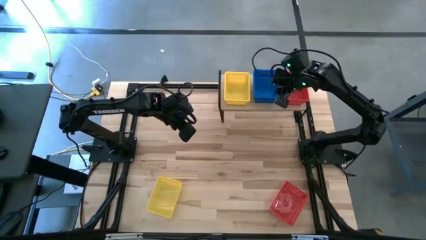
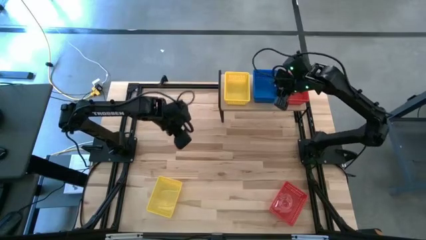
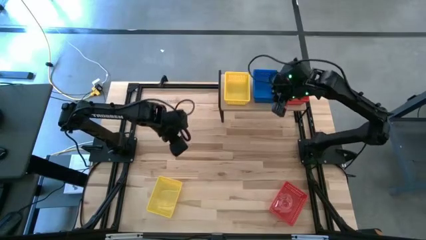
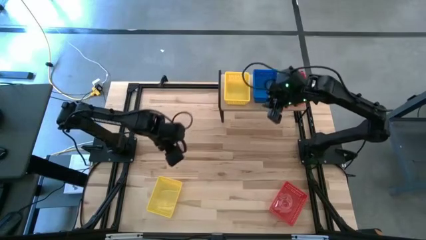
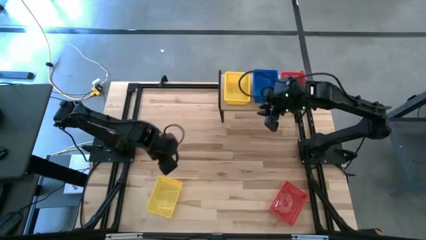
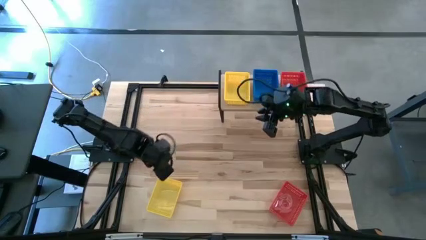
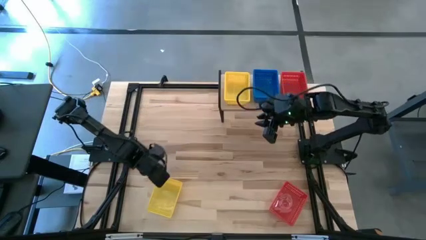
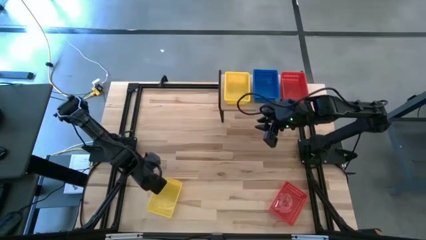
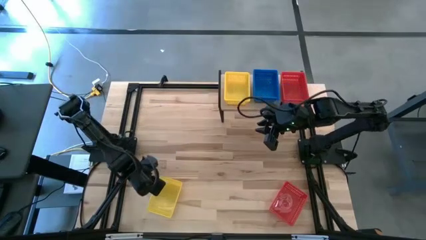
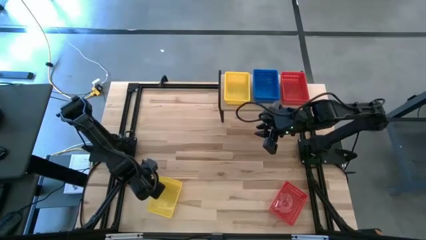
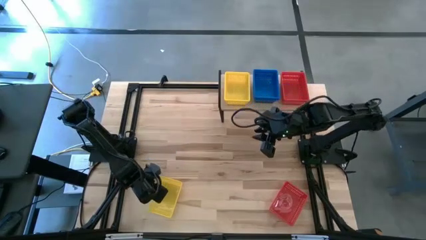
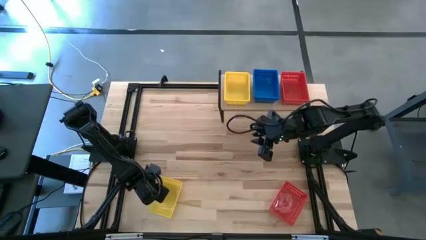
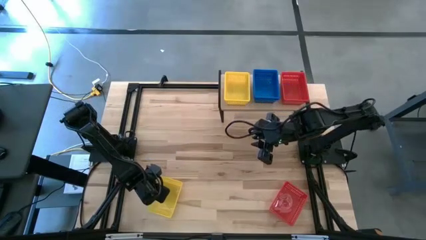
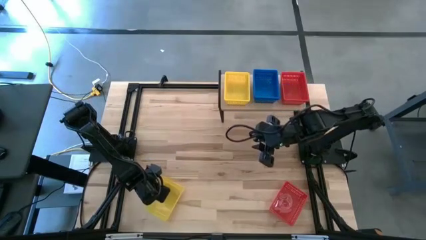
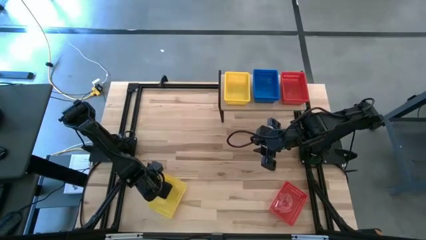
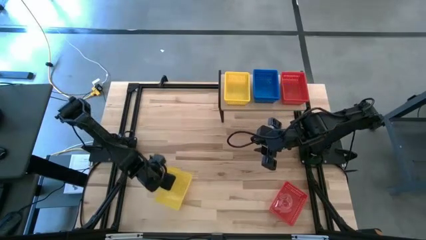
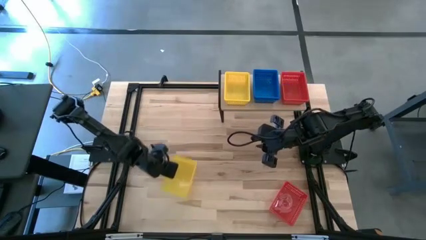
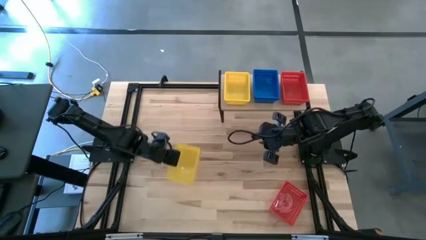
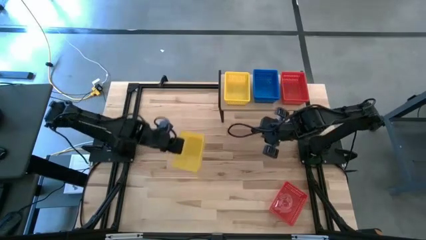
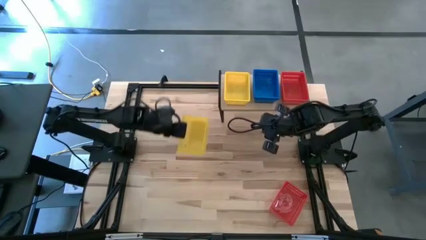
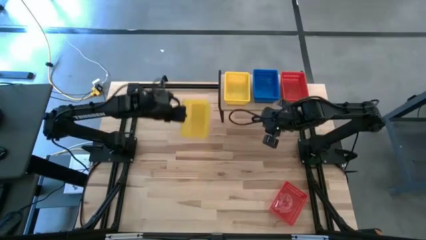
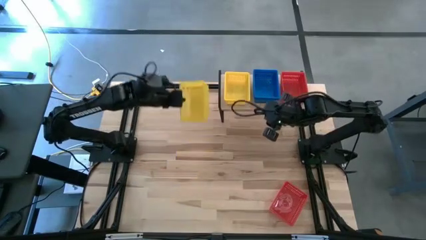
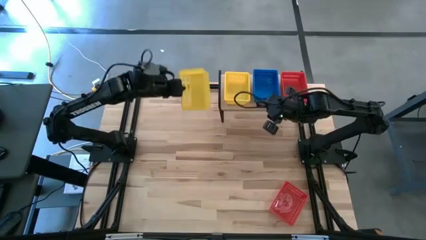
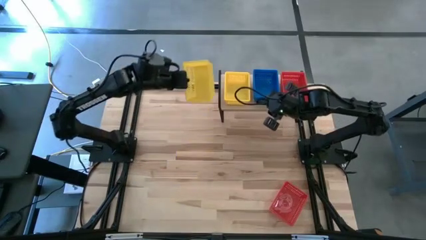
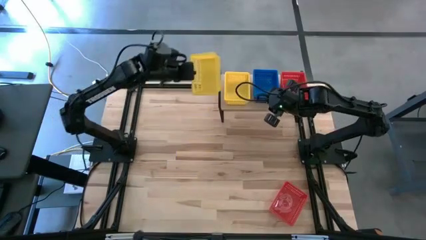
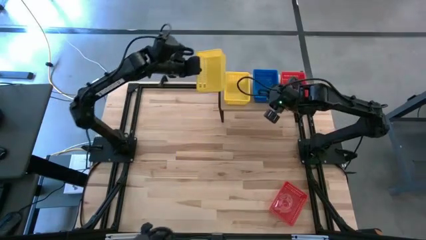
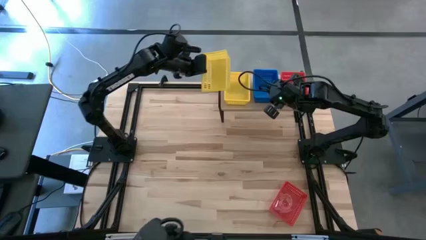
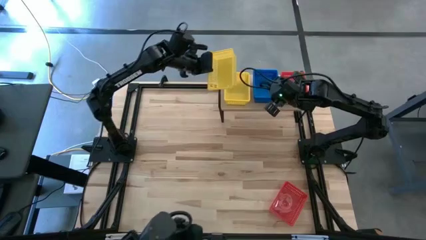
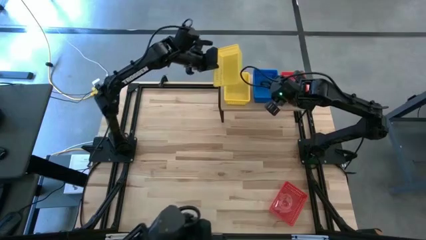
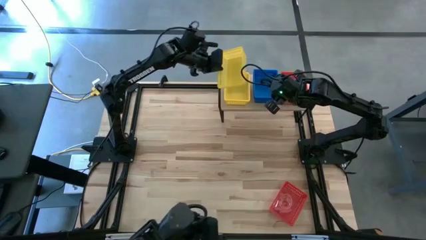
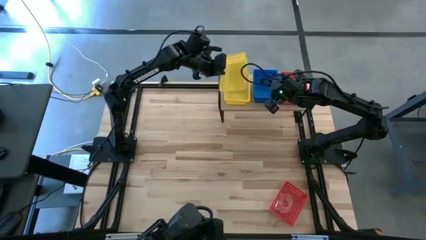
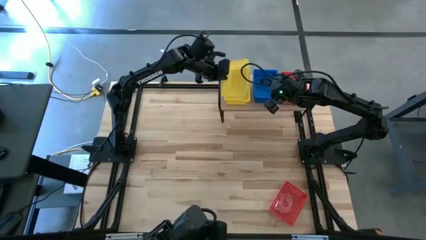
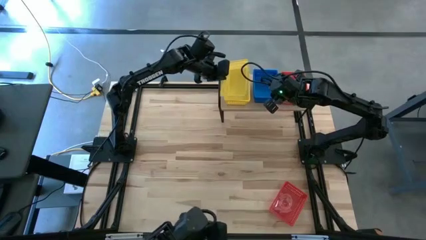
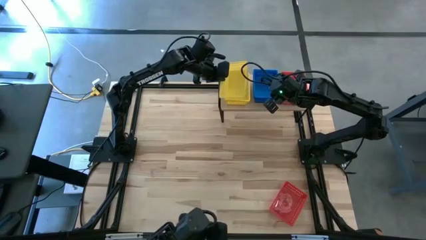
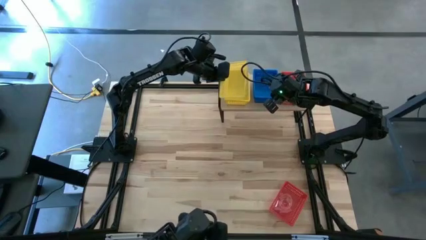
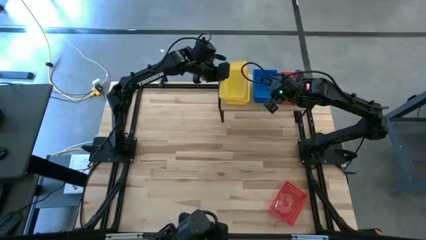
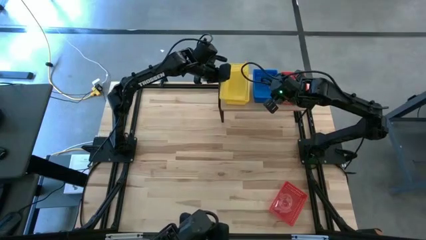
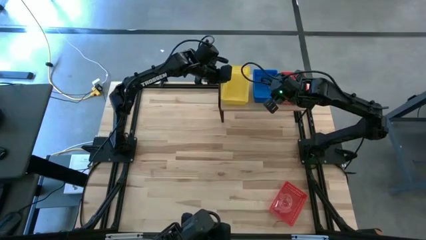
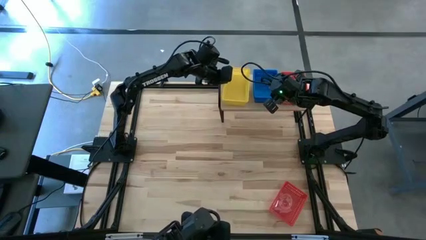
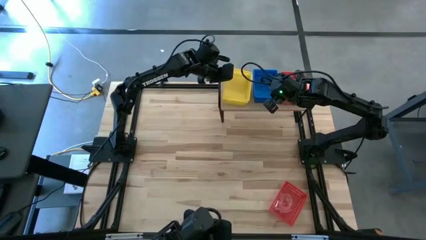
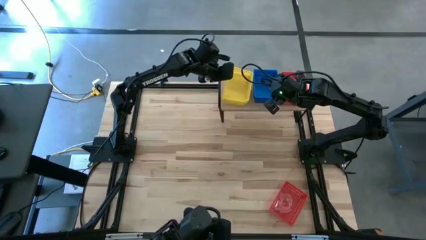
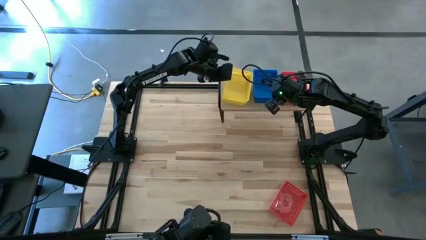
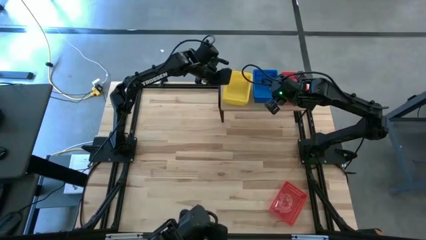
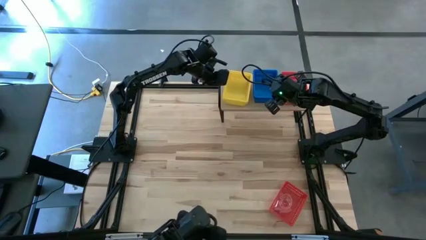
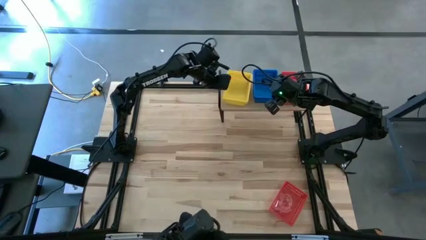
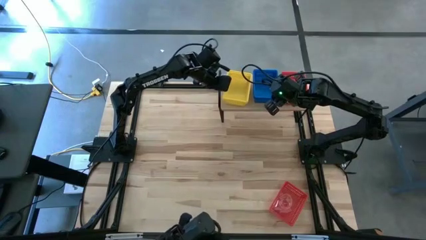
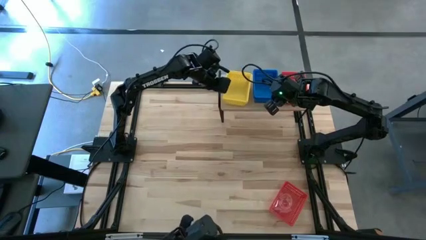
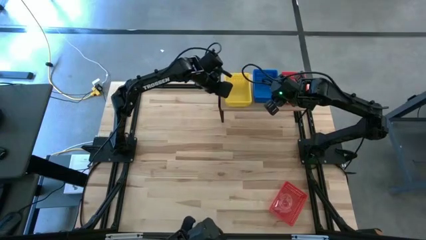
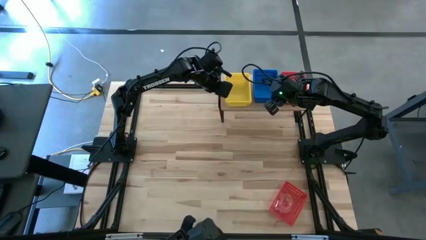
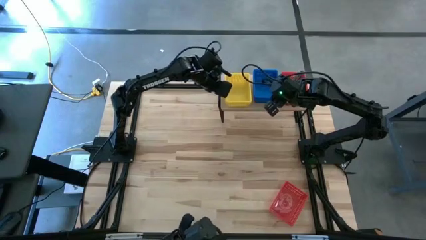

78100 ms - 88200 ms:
Task: Stack baskets on shelf by color
Stack the yellow bin on top of the other yellow bins on the shelf

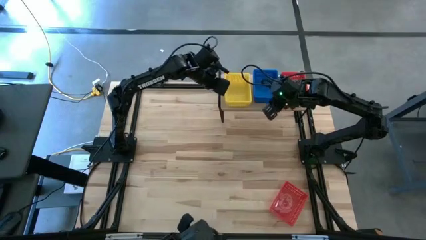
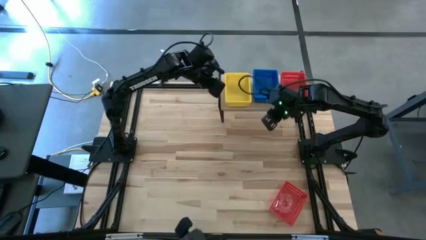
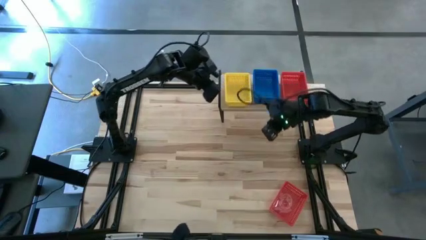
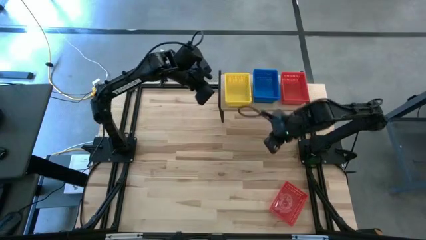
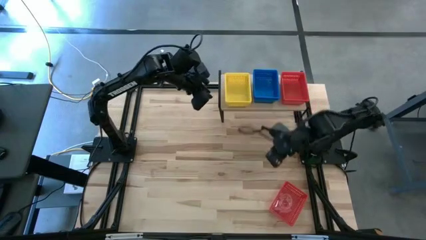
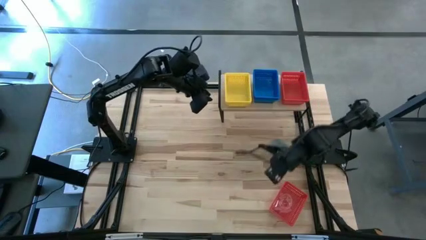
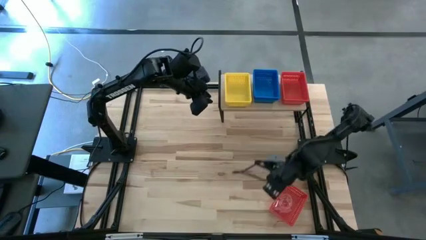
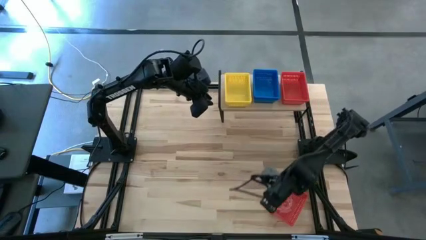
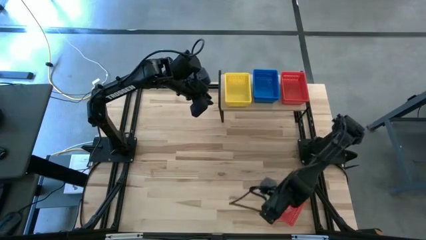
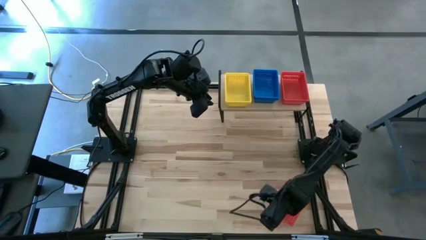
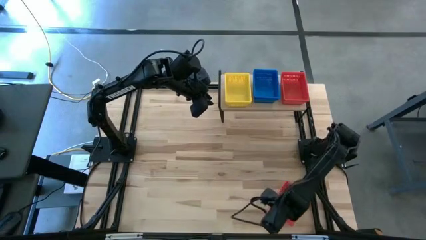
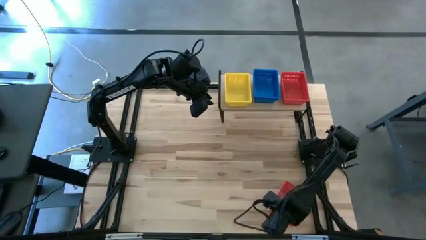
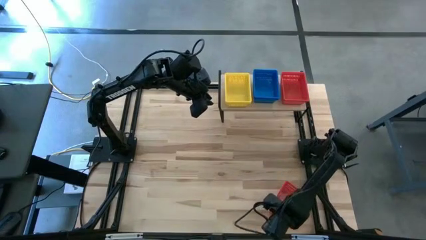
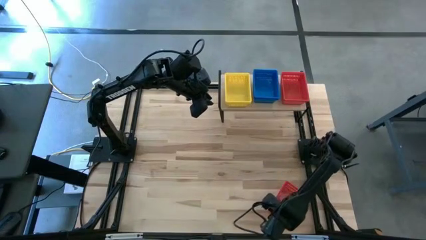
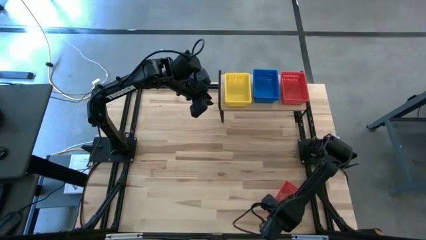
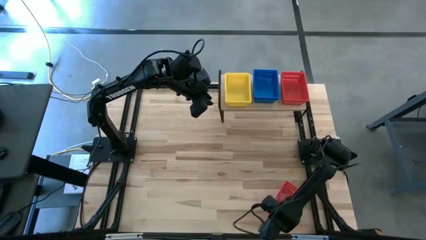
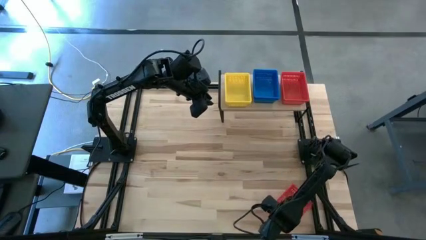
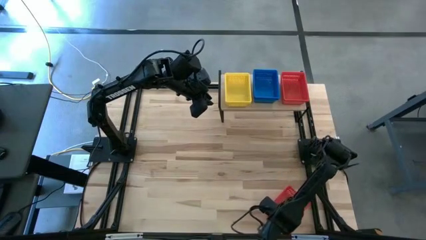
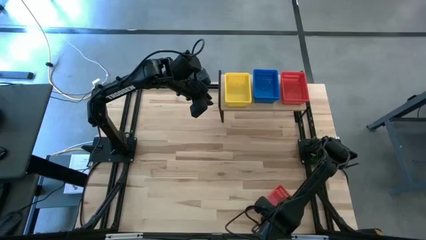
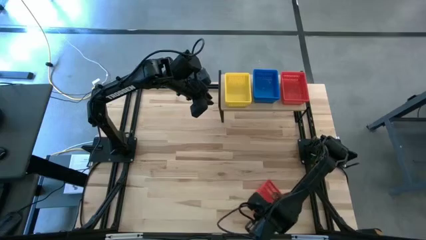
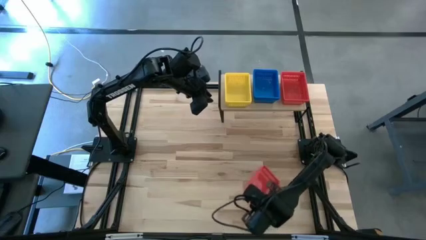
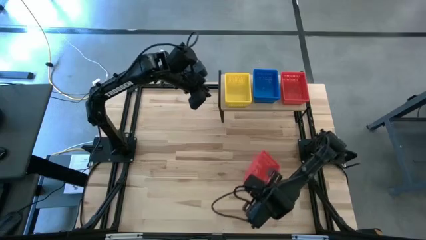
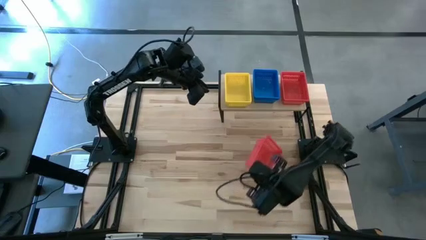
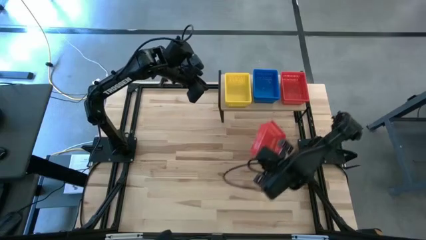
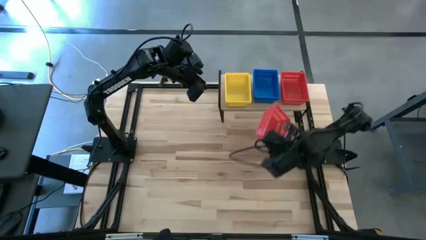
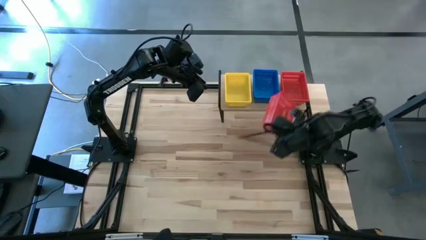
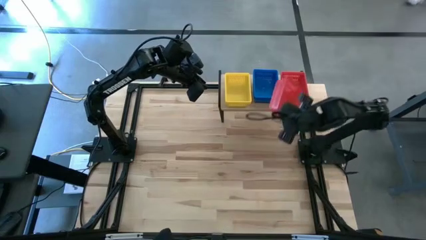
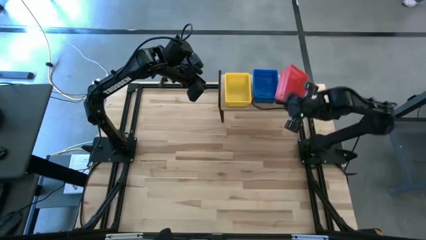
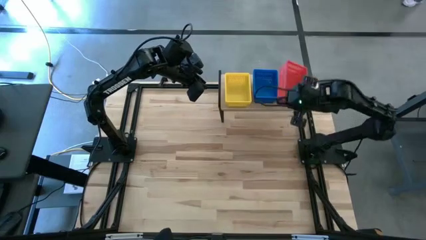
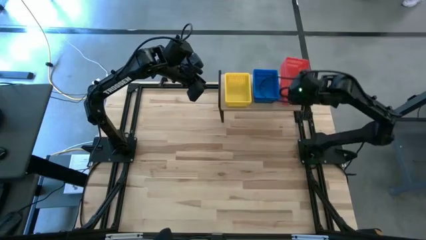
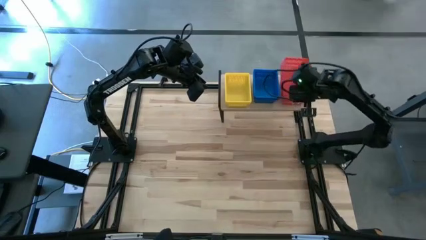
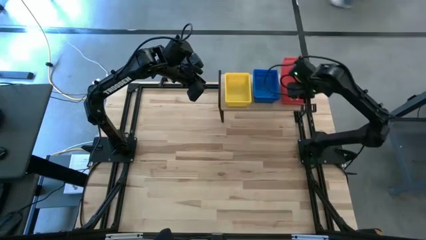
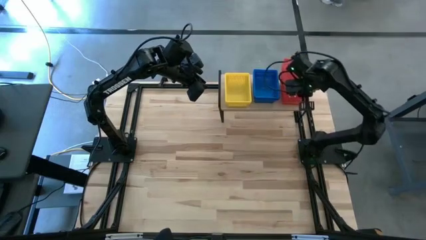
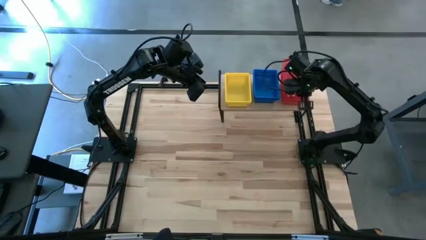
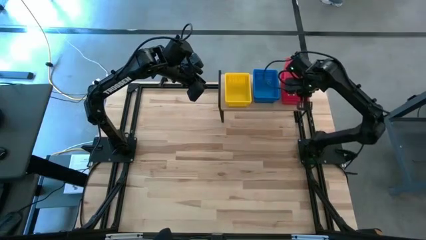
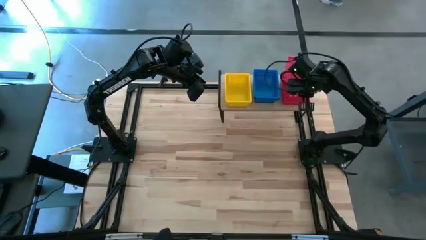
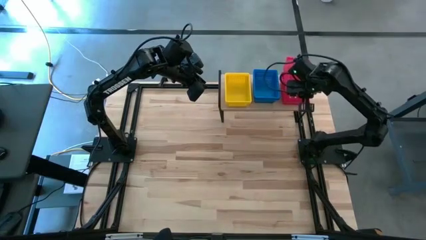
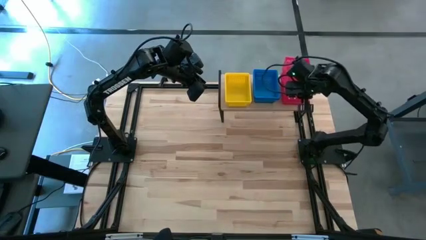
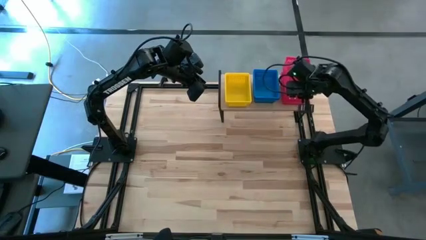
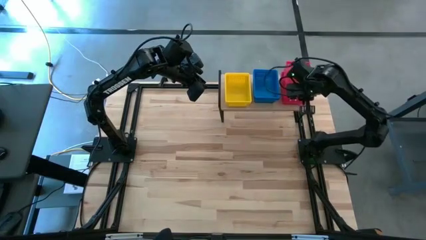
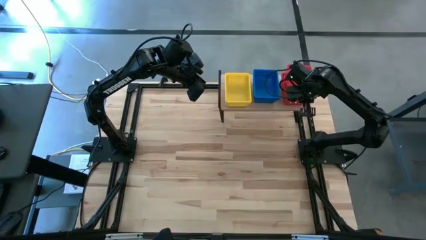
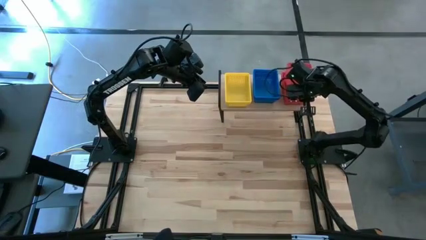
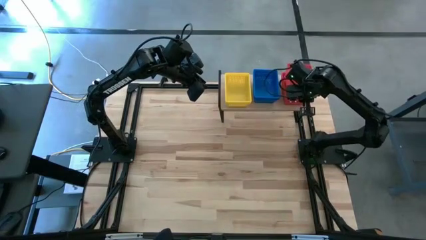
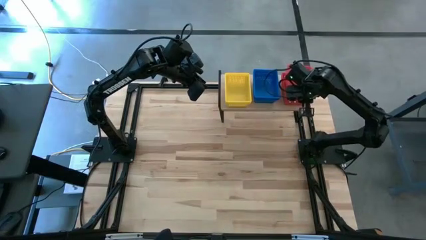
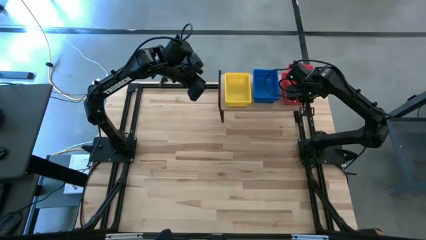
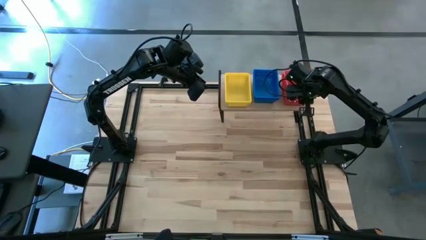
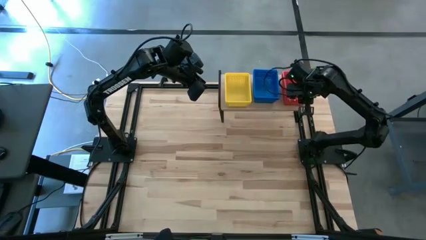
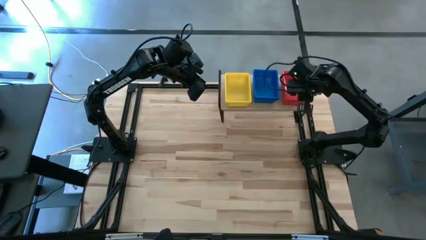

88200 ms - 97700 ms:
Stack the red bin on top of the other red bins on the shelf
